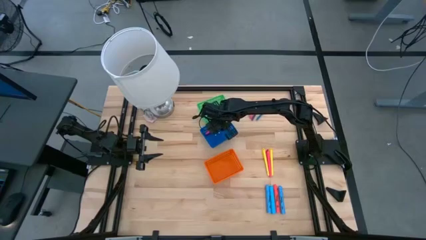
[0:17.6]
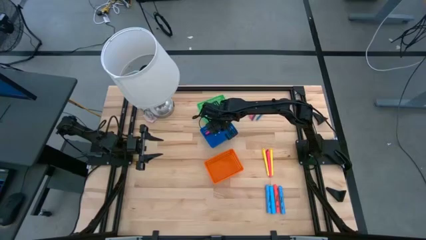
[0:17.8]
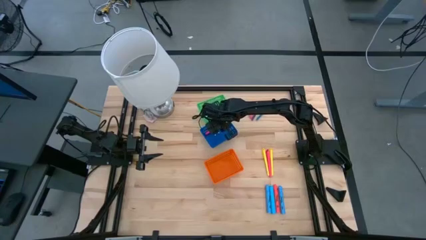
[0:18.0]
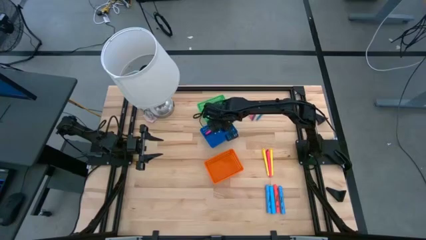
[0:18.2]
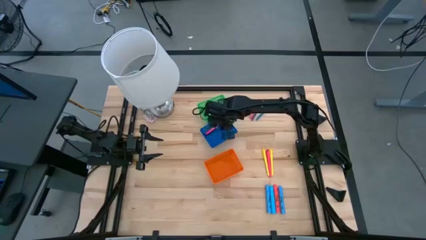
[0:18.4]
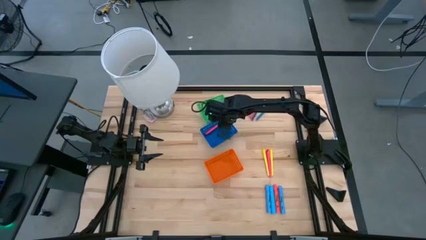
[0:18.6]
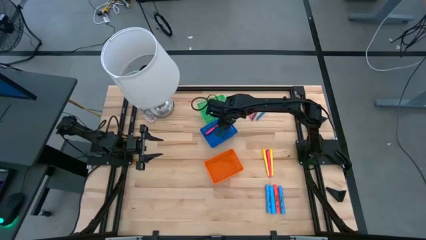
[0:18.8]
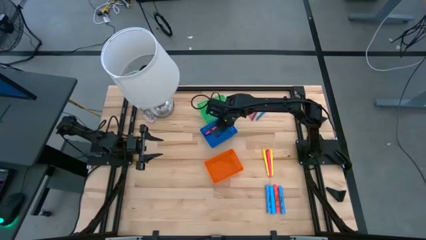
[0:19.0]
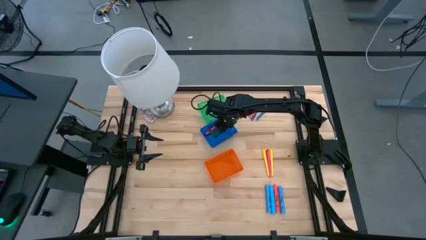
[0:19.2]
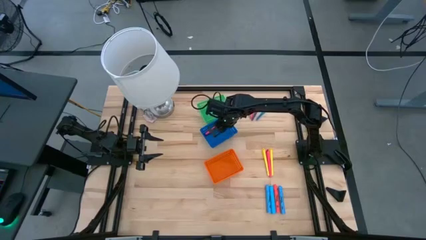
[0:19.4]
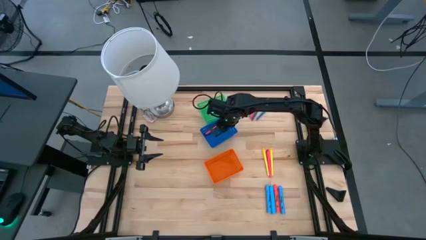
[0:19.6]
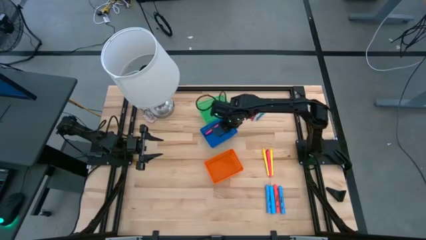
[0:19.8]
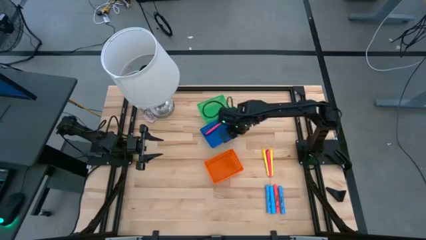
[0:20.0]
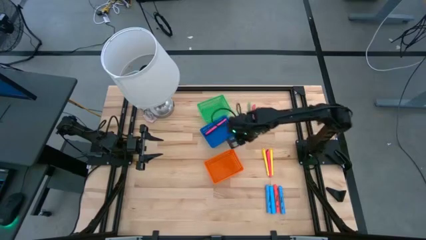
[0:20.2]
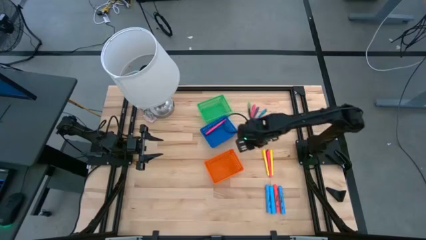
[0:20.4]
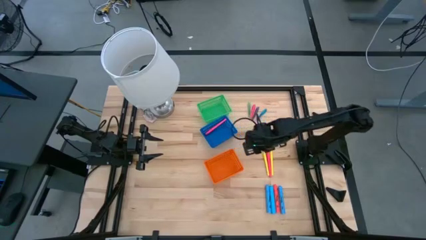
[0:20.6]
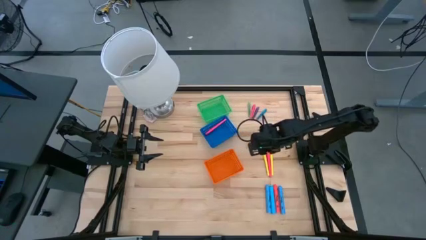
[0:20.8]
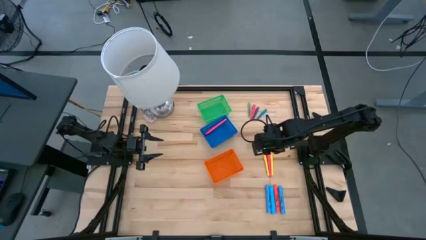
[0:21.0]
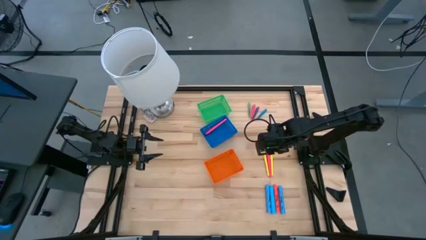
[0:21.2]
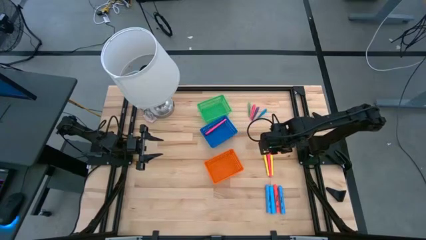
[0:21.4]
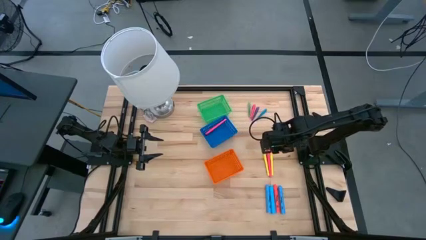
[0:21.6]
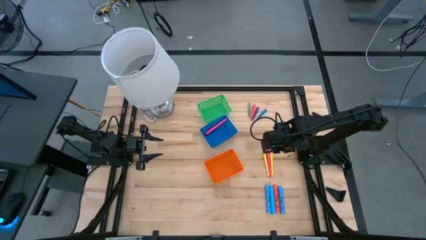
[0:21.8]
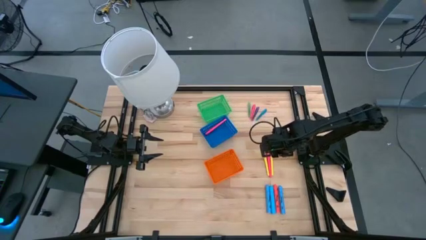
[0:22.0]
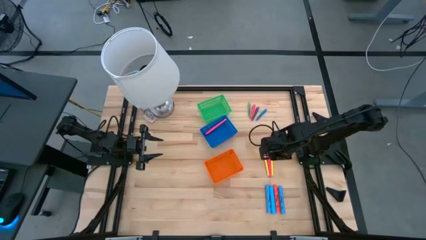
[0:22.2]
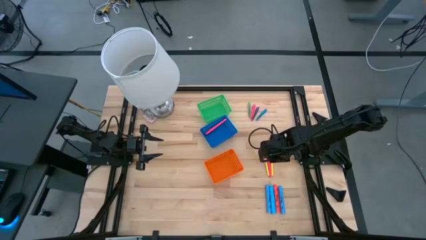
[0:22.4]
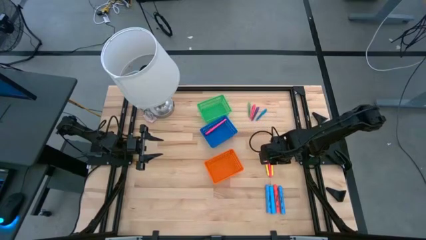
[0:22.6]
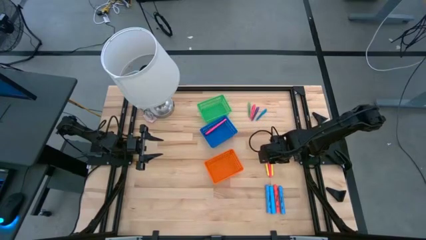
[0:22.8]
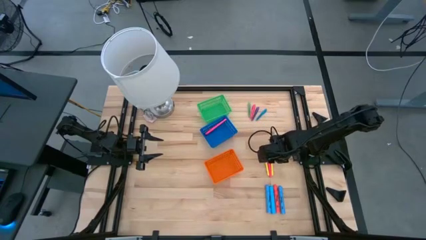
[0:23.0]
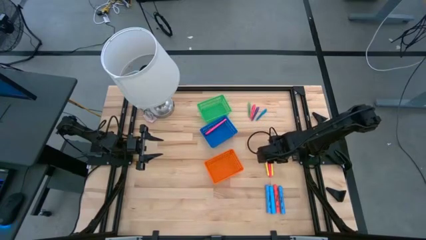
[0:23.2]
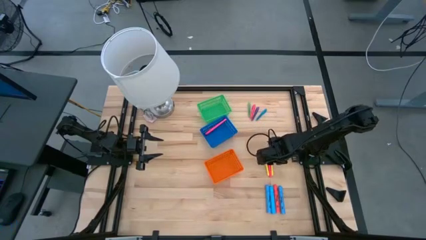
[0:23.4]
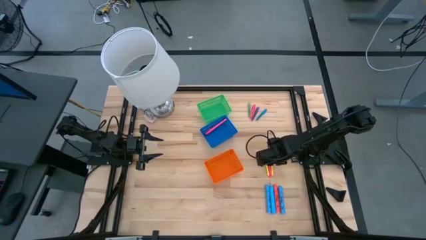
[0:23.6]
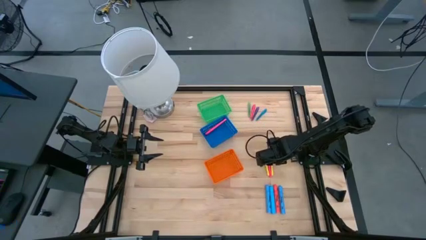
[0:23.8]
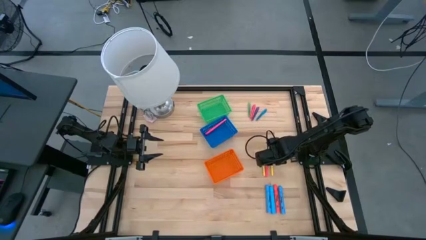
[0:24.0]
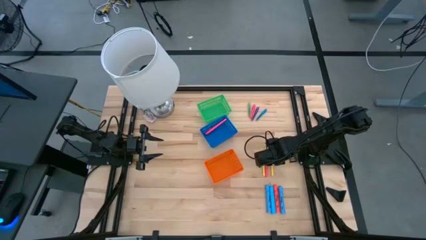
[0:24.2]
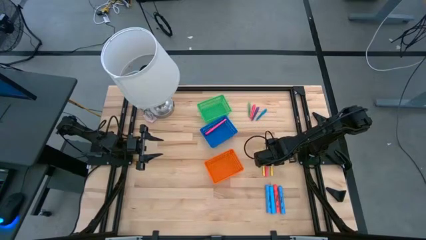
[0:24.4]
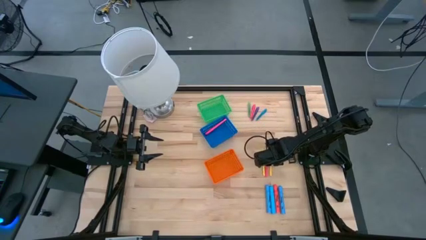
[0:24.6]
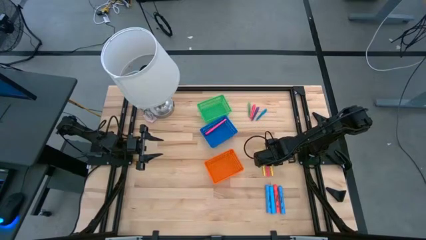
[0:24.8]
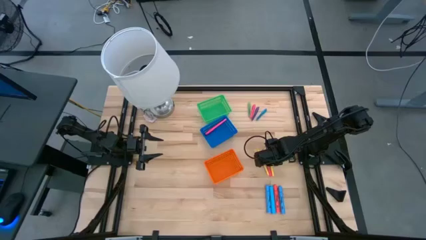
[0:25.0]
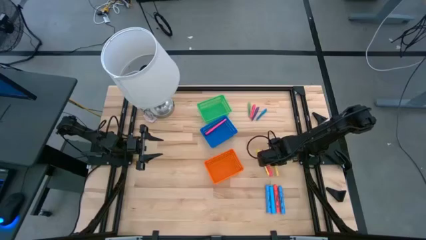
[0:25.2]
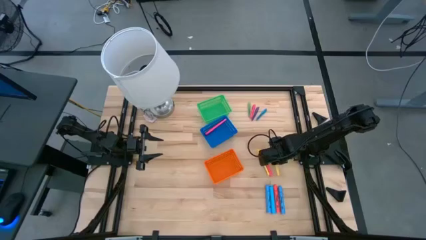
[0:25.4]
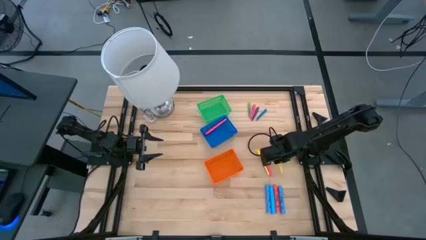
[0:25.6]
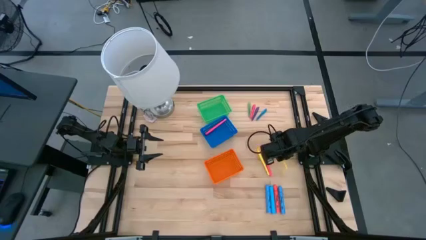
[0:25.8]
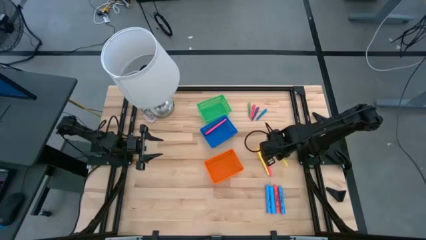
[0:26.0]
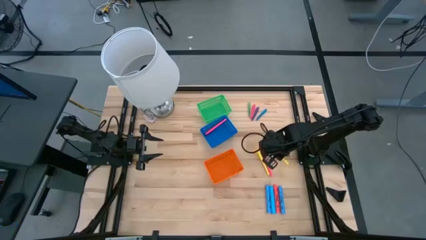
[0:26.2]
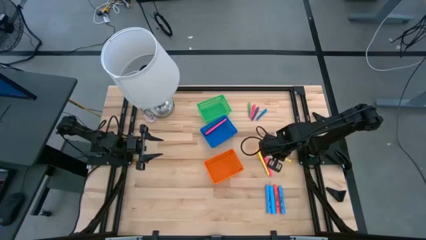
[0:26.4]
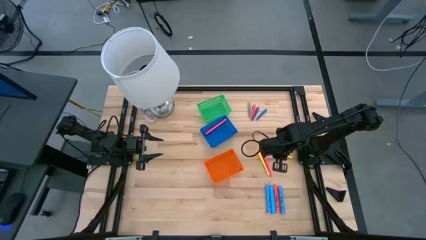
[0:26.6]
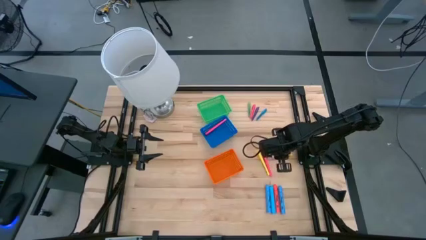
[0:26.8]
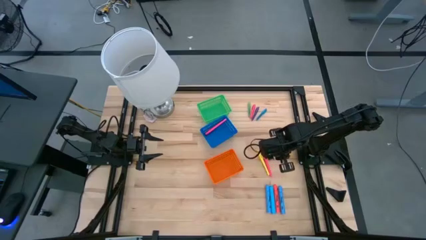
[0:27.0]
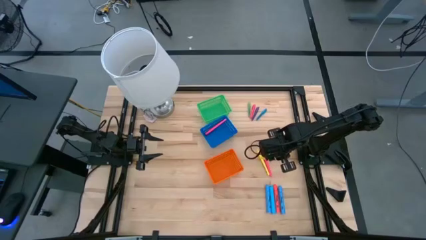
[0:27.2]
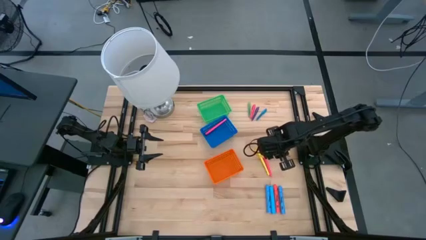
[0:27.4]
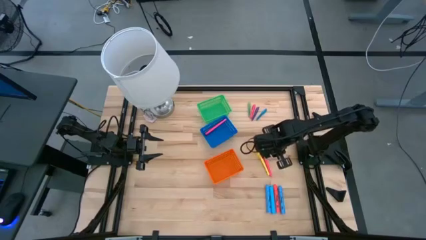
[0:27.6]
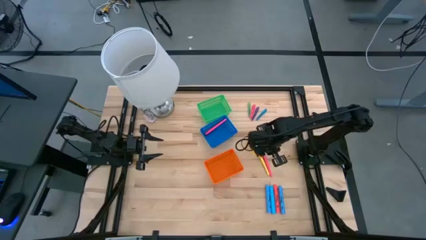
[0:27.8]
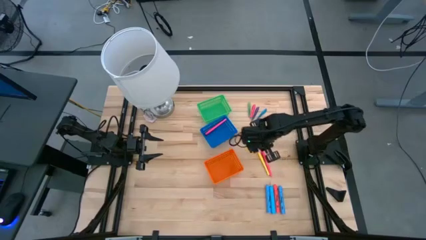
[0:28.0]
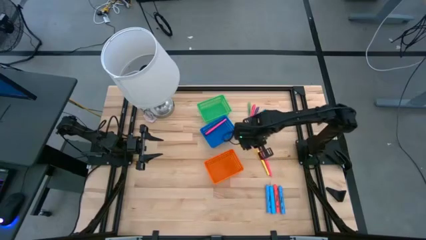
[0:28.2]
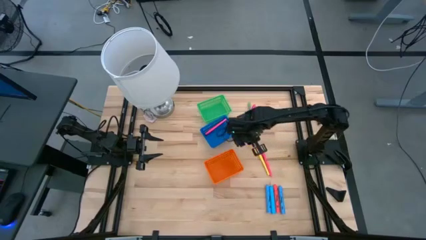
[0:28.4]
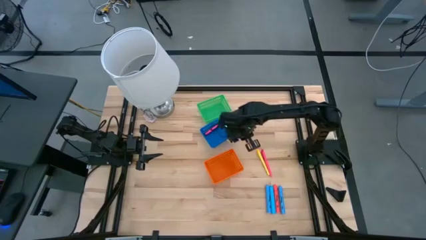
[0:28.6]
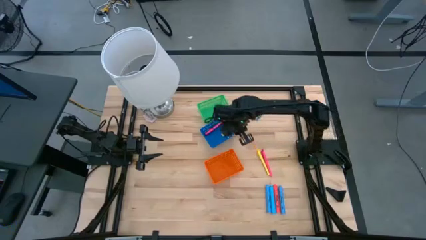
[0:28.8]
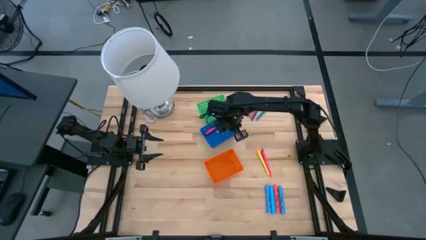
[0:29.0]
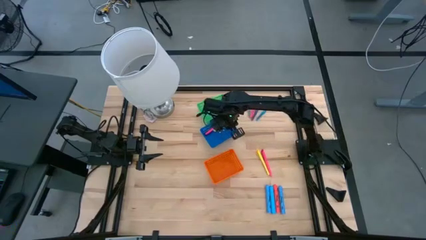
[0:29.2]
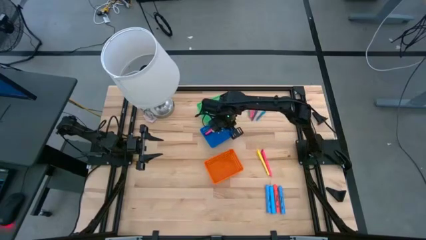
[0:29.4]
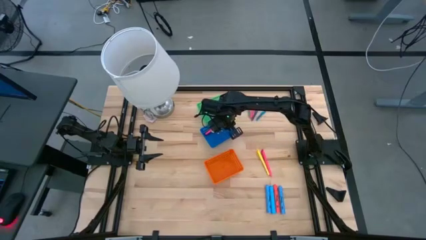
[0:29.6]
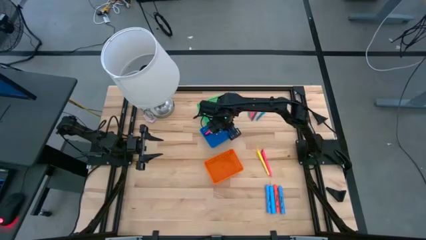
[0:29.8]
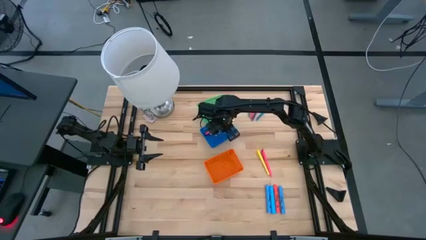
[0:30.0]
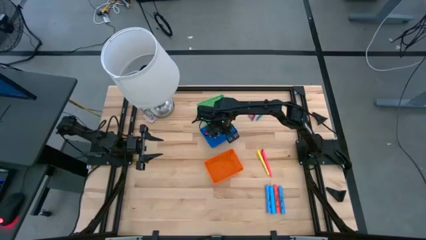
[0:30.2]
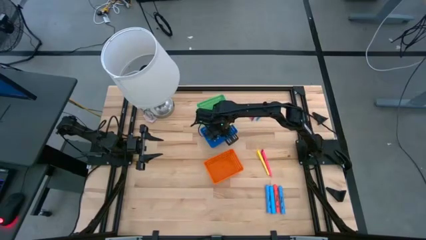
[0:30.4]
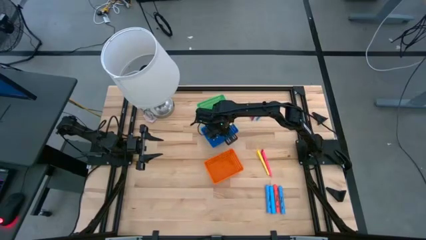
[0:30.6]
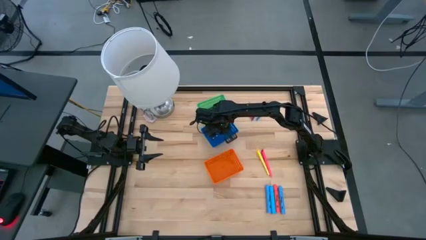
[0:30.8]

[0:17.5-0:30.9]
Task: Pick & Place Markers
Put the right yellow pen into the blue bin

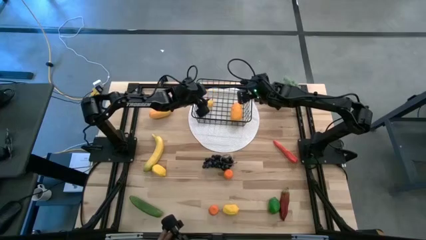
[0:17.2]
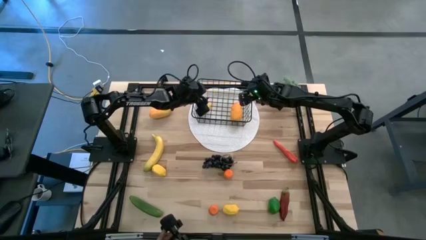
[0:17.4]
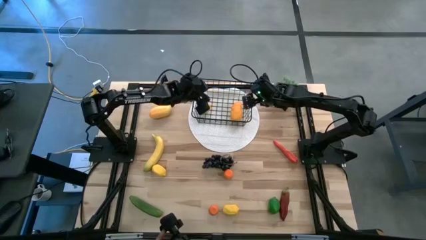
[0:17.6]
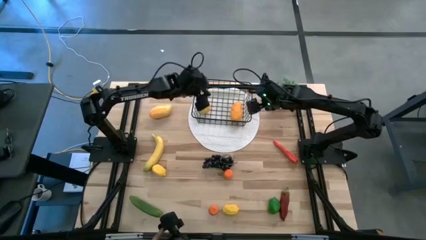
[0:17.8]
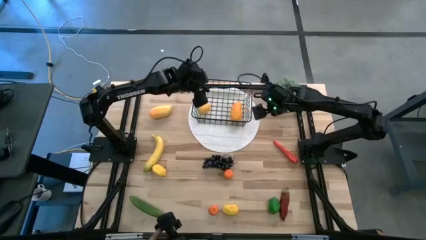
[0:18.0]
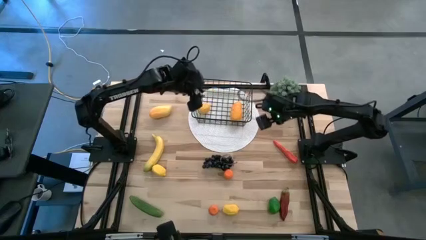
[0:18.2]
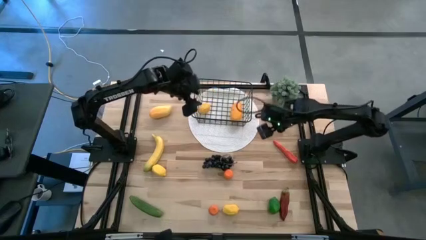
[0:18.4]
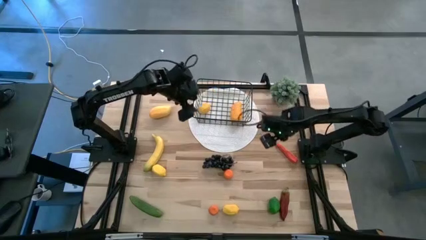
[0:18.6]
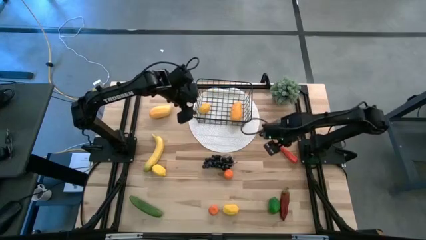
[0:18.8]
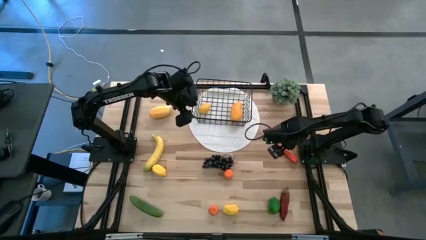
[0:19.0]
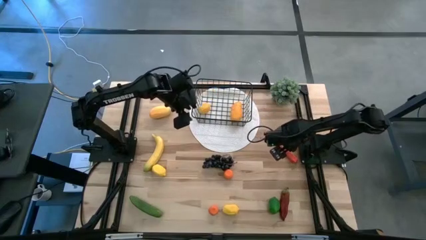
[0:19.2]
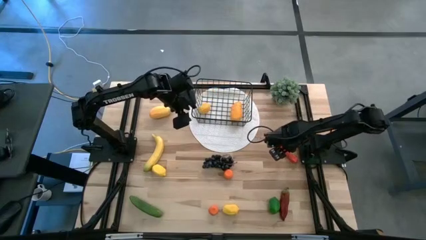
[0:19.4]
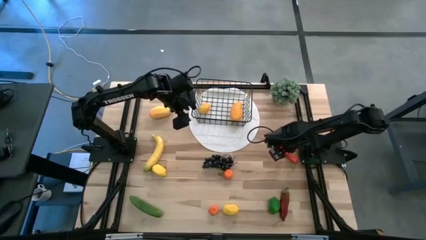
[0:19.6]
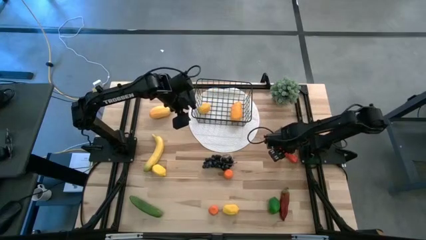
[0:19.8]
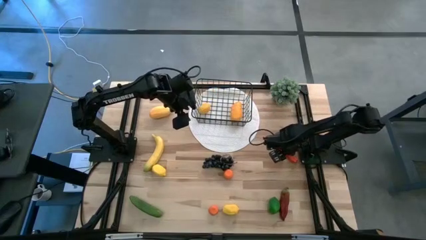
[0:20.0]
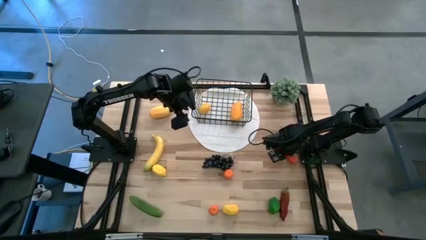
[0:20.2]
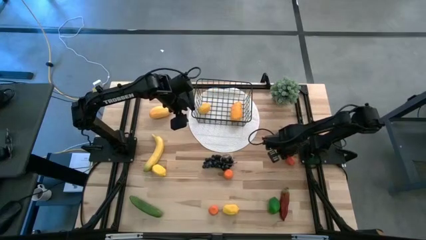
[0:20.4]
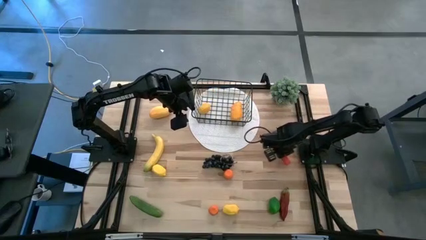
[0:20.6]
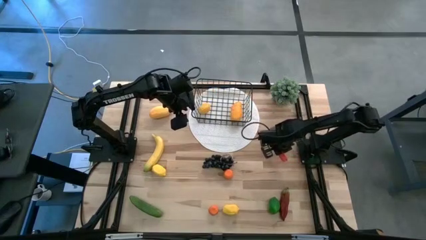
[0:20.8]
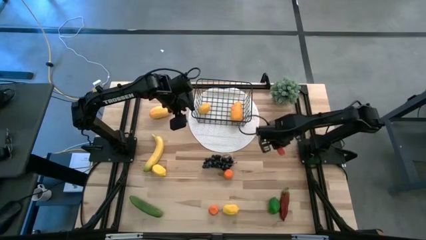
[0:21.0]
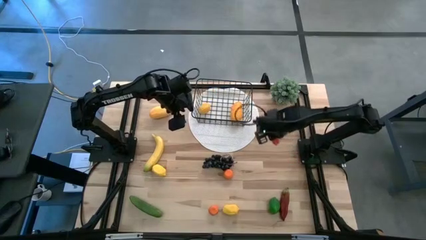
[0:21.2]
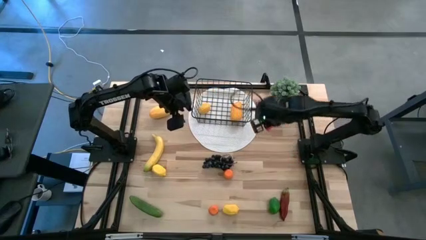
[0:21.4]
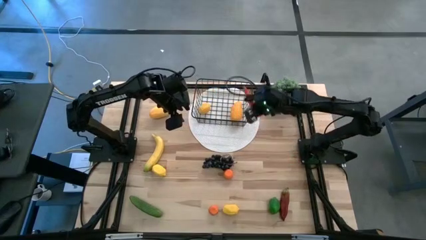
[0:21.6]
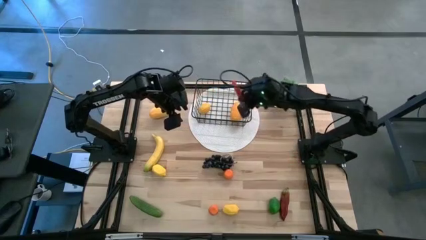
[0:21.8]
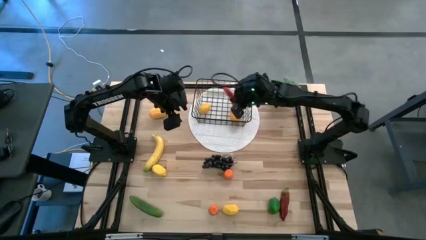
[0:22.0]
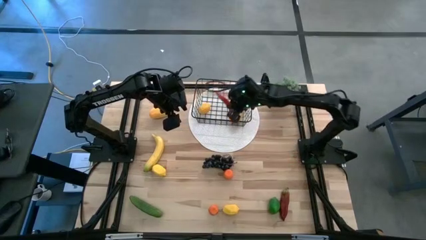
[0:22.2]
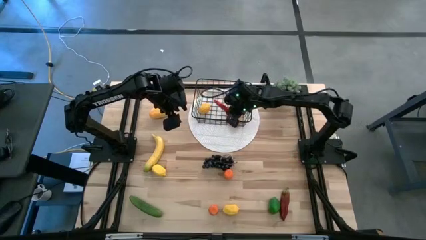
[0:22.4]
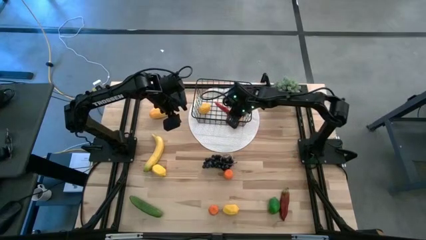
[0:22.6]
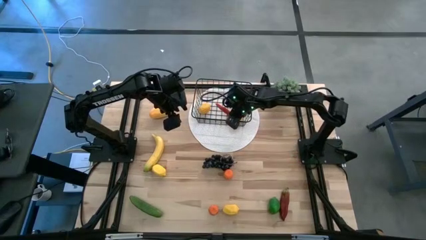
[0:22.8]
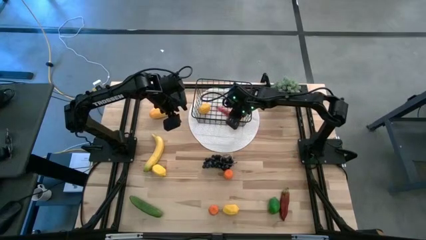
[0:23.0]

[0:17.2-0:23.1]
Task: Build produce basket
Put the carrot into the mesh basket
